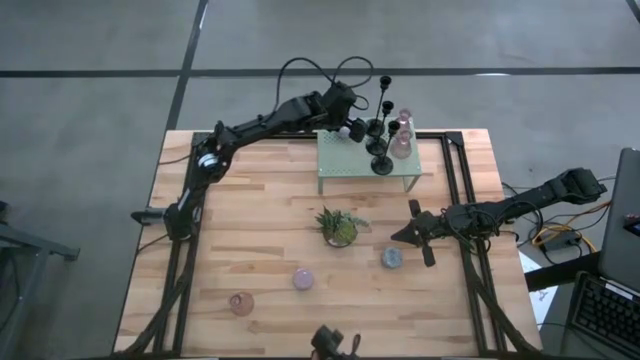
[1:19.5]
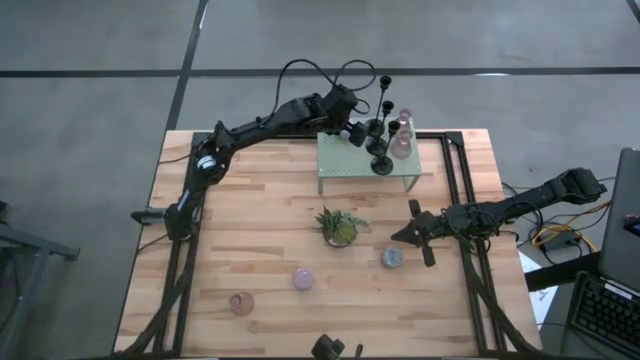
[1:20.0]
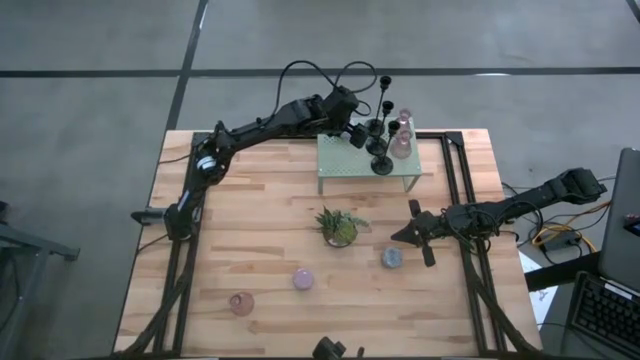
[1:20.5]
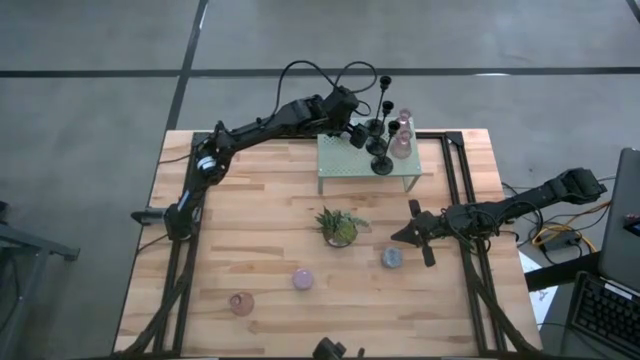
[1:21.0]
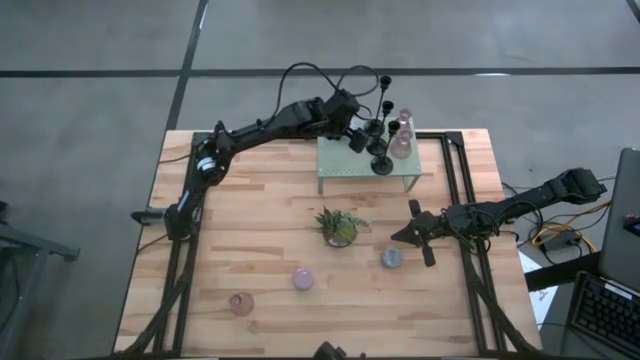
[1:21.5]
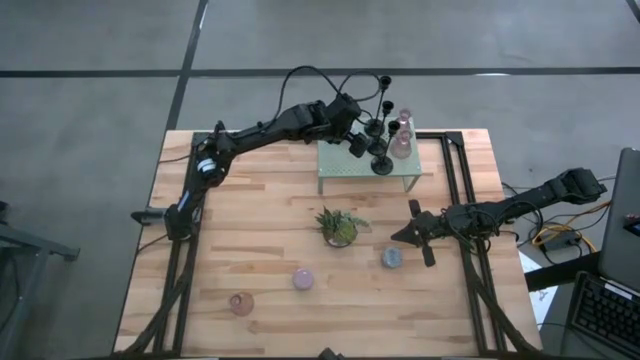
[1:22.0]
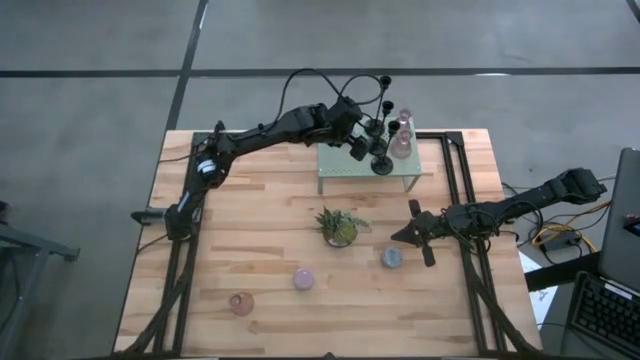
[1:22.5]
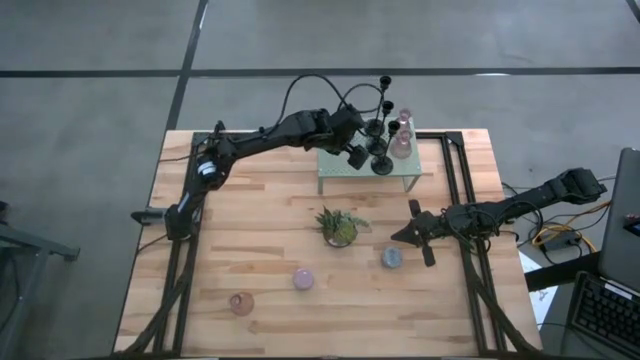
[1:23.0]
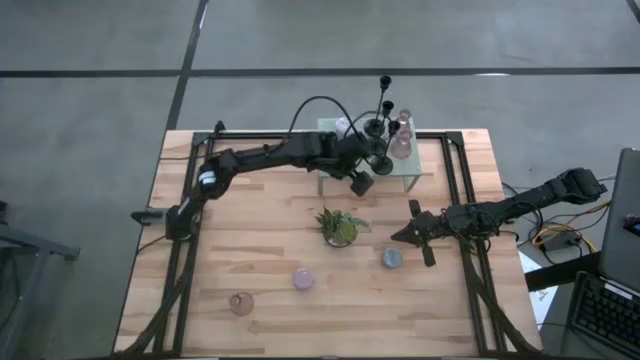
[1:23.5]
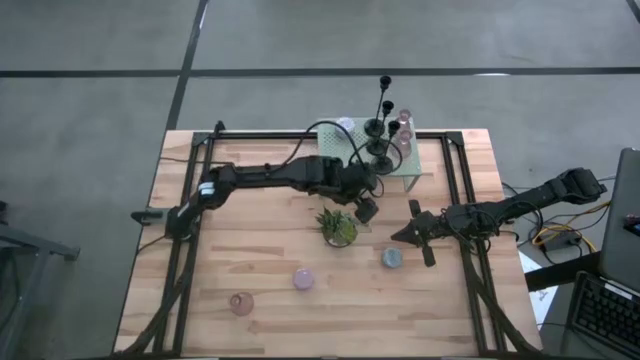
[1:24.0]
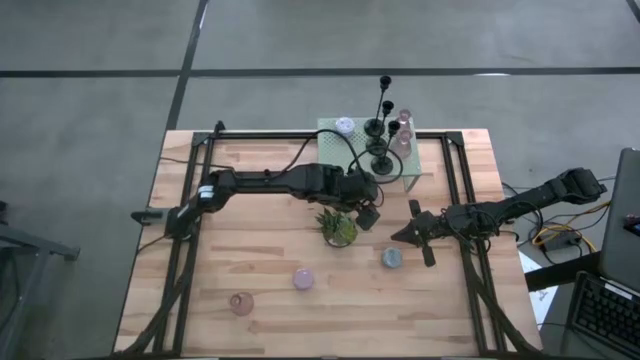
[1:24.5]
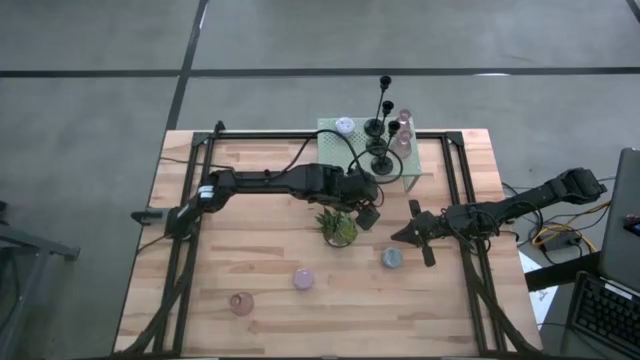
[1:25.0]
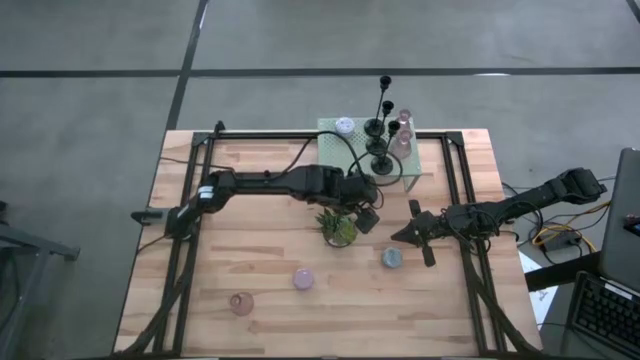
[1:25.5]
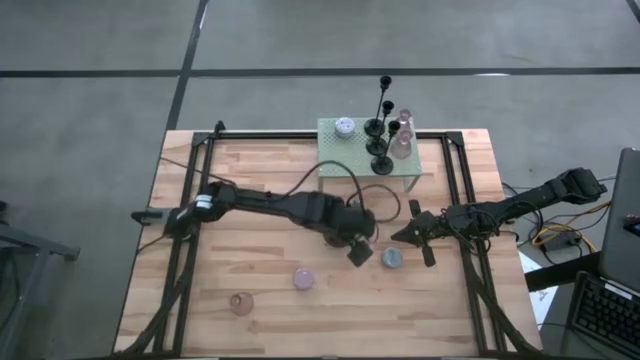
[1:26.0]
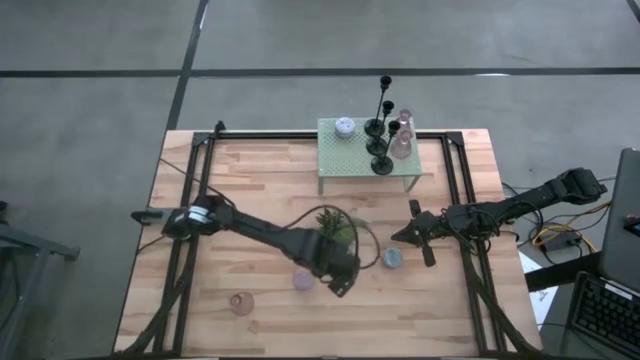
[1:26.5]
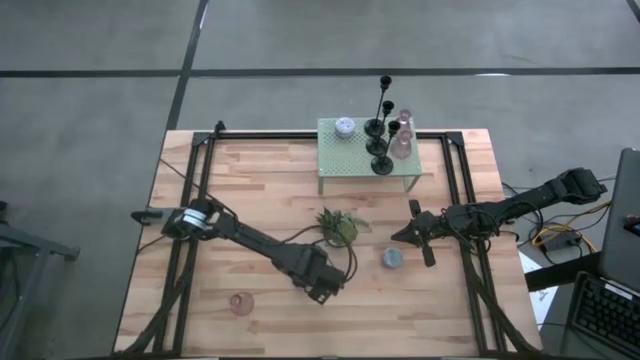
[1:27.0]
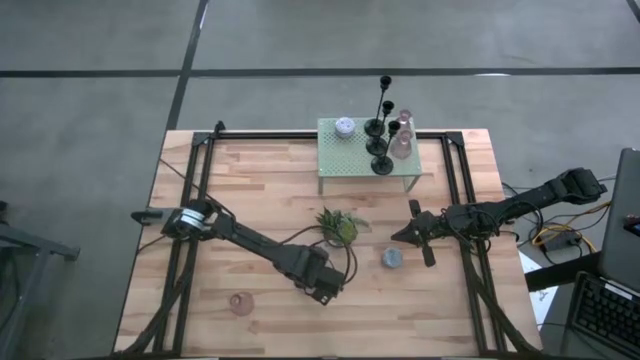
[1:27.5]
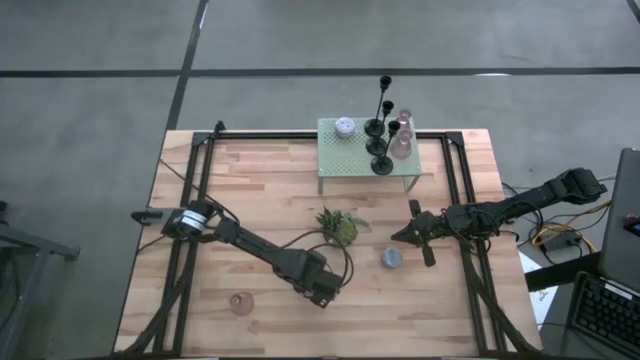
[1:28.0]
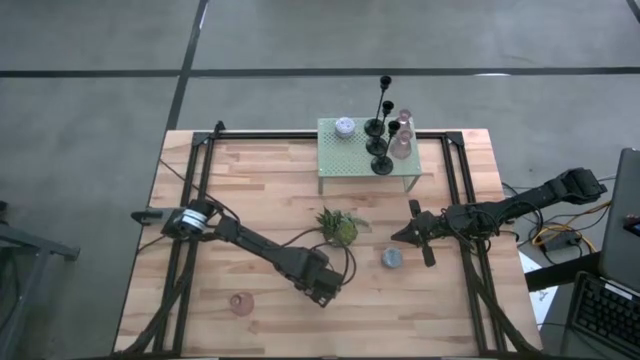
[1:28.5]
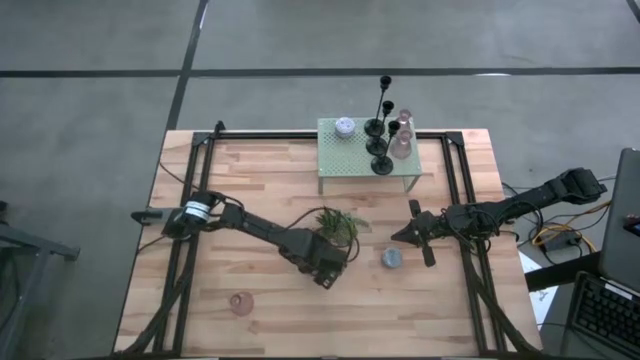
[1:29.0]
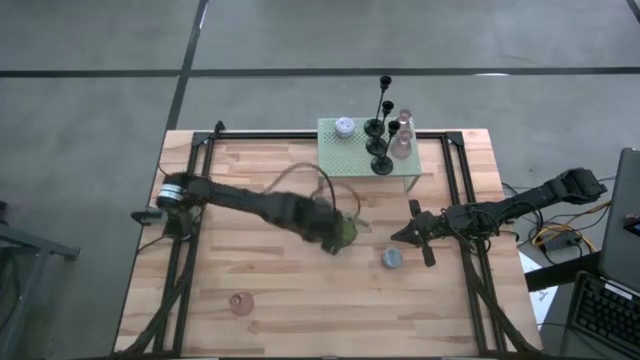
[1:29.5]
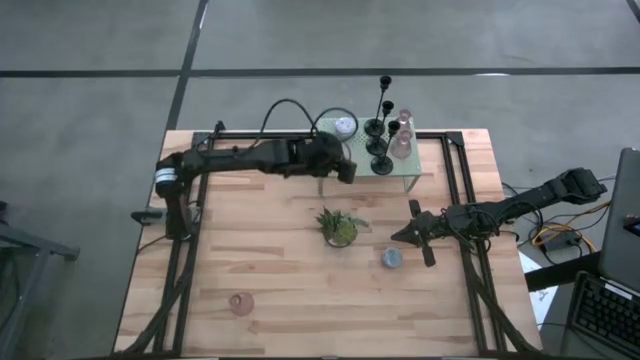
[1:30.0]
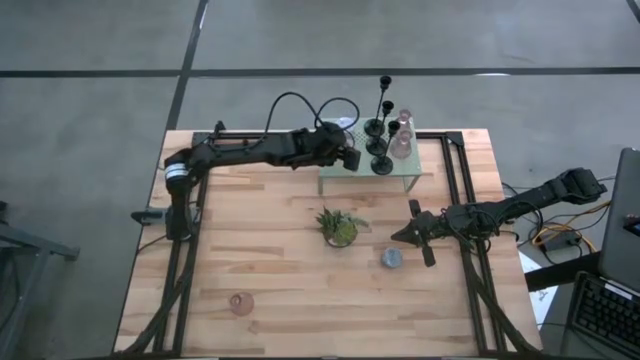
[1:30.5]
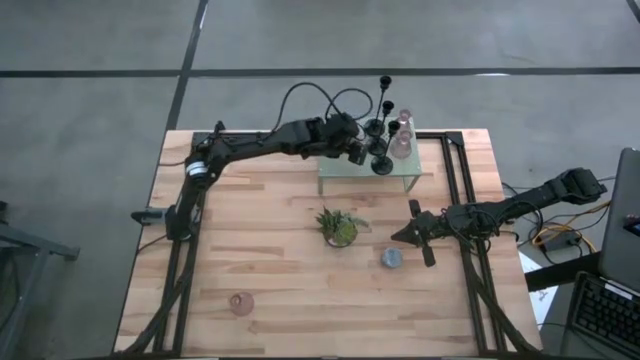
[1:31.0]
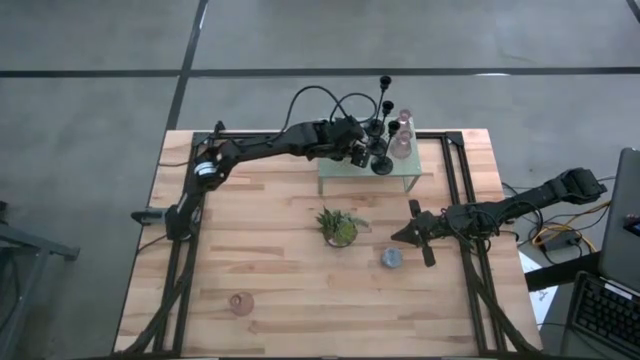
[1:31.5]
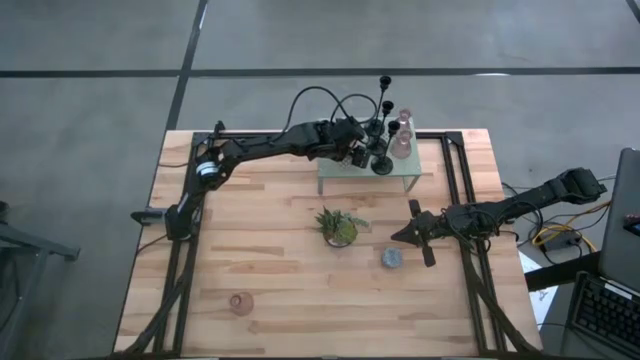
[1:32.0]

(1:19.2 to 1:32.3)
Task: Pick & Place candle stick holders
Put the left pink scented candle on the shelf

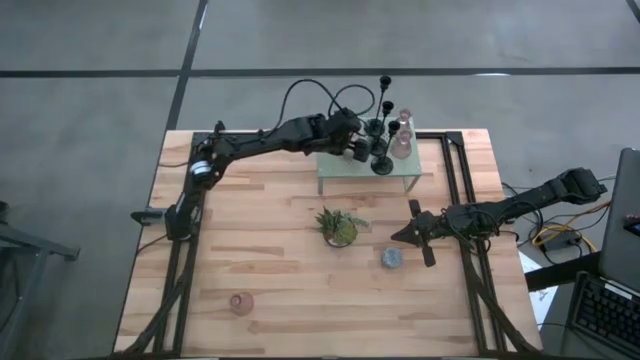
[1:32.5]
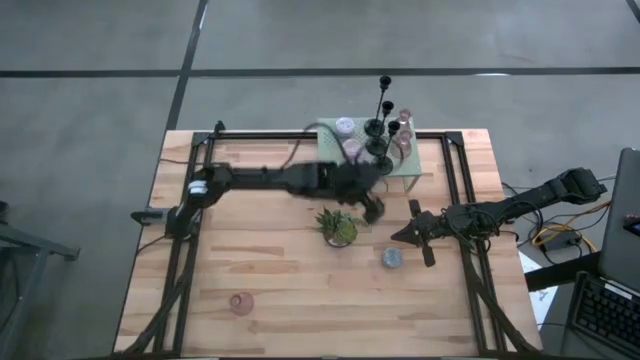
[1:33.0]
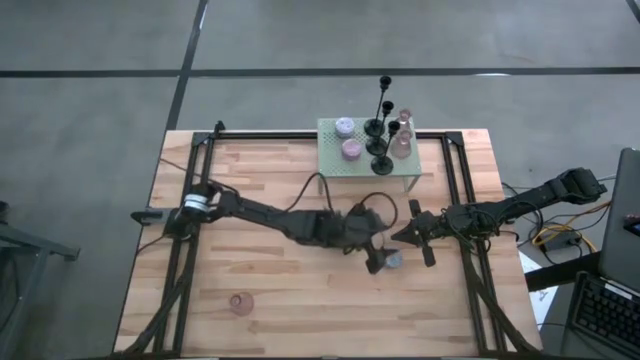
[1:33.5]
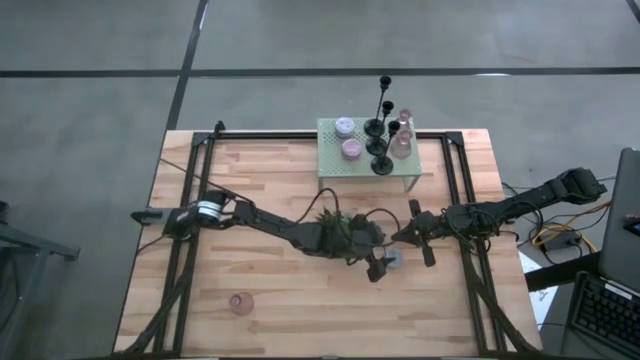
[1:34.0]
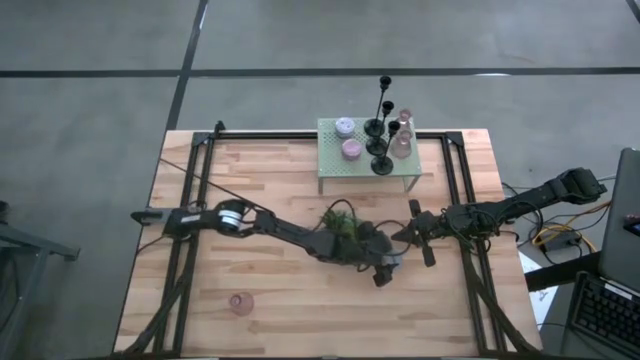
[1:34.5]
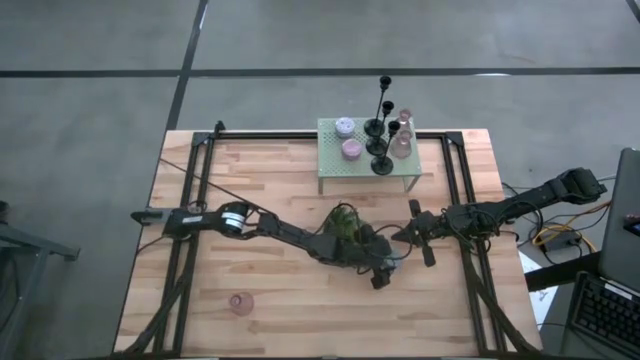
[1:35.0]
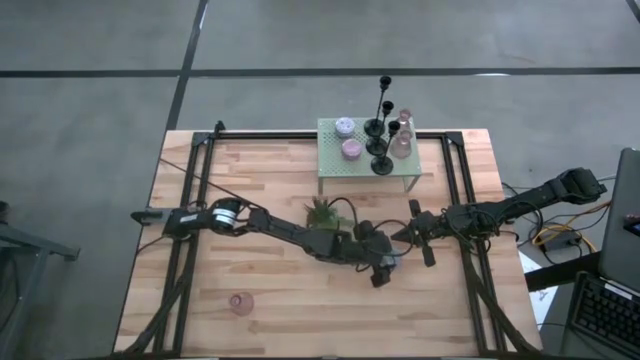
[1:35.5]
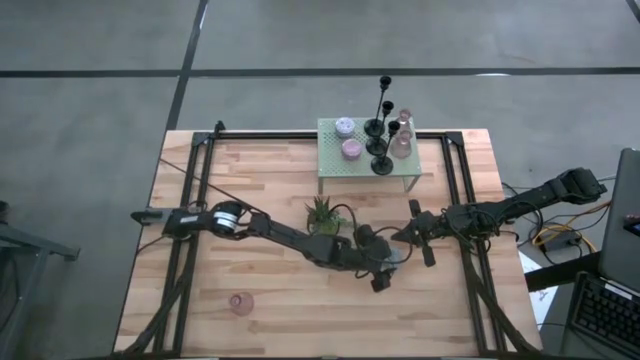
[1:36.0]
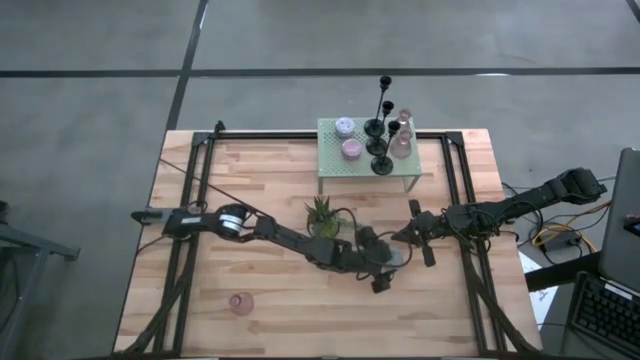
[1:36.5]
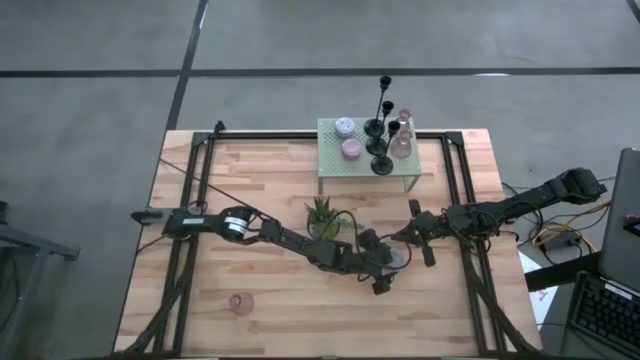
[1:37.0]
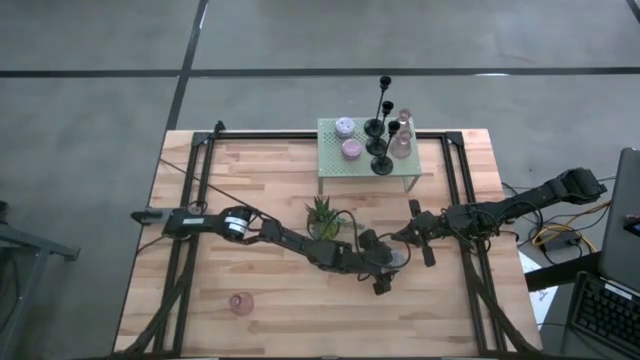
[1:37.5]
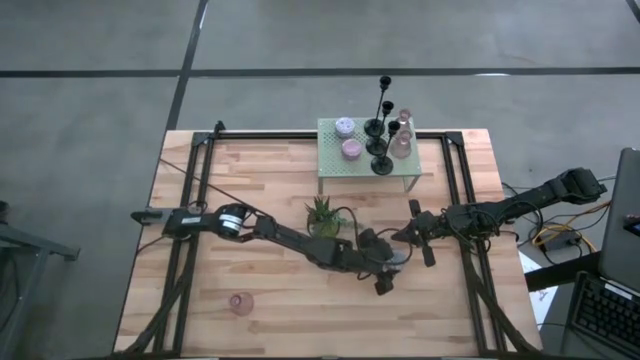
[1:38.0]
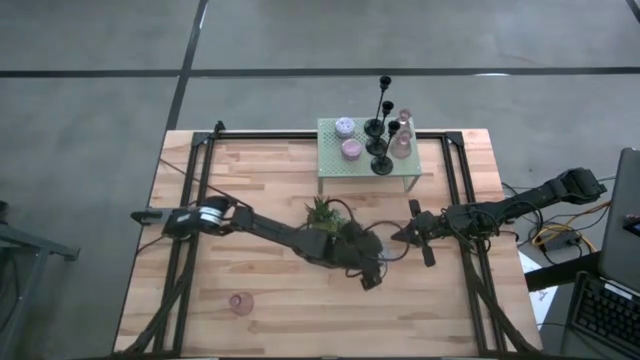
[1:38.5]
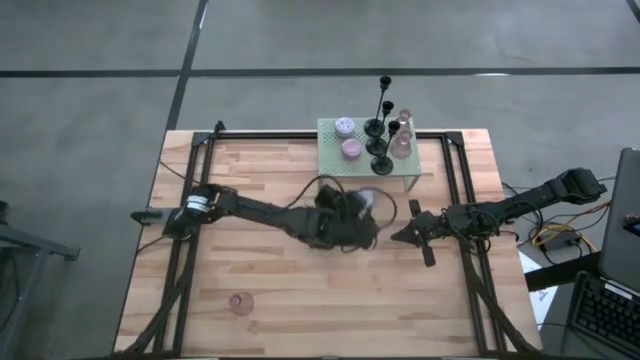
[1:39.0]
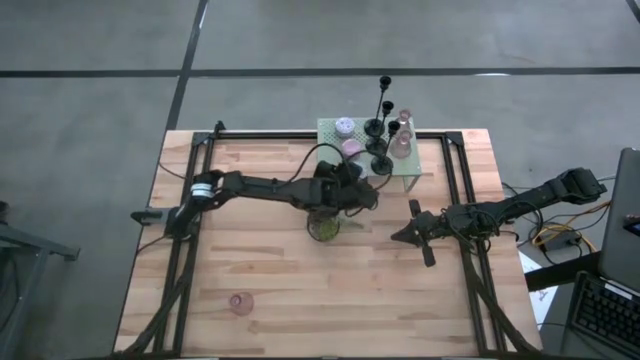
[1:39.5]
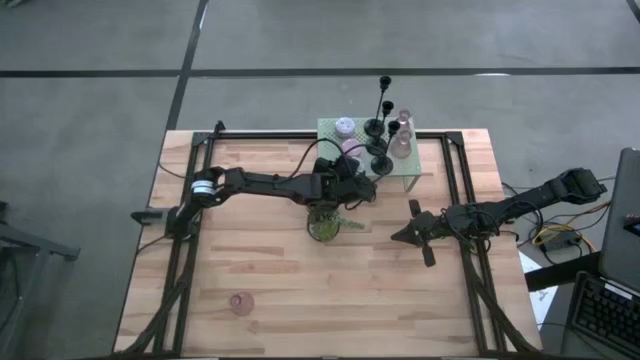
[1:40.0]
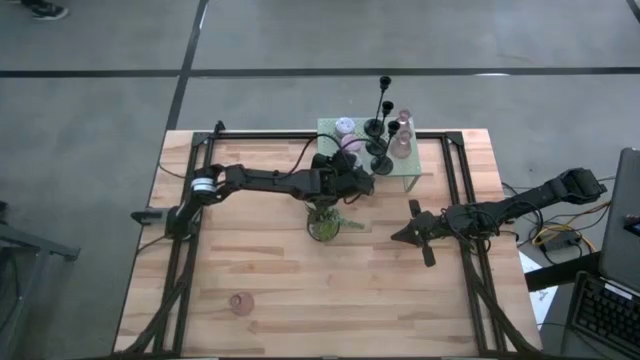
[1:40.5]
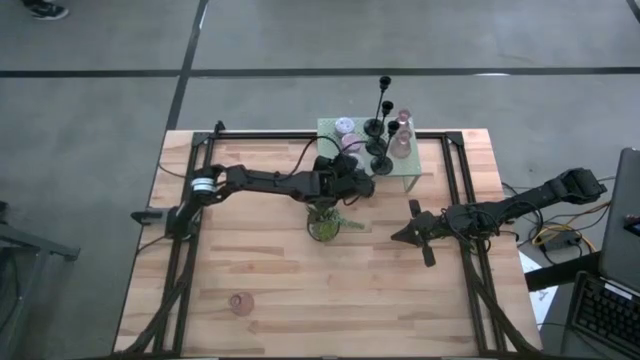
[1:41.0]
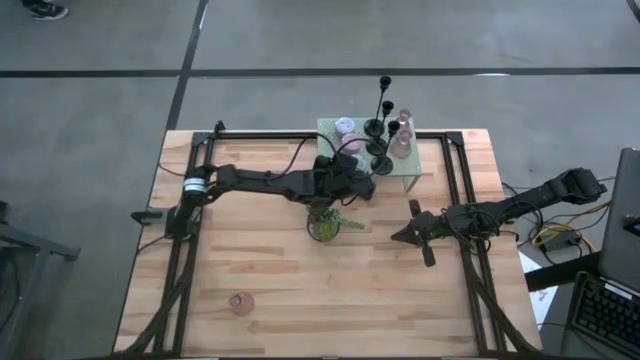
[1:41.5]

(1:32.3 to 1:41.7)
Put the gray scented candle on the shelf
